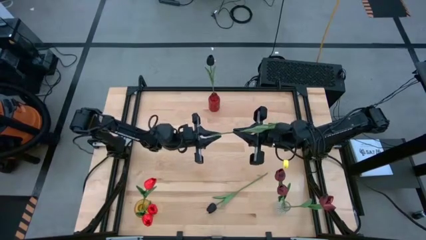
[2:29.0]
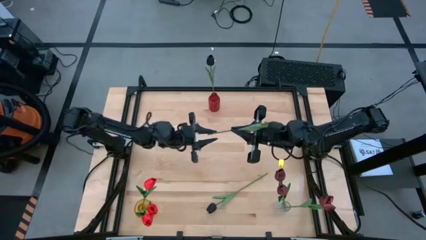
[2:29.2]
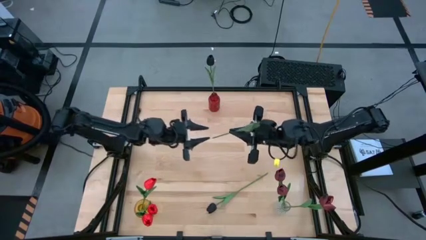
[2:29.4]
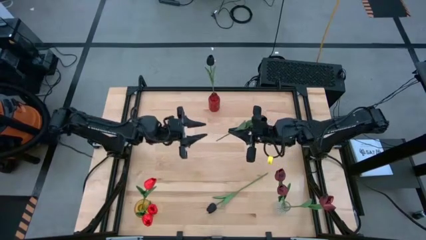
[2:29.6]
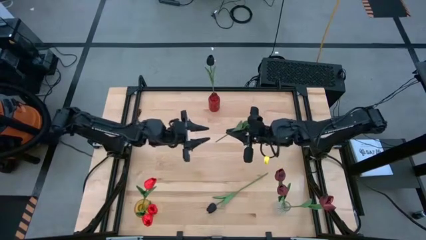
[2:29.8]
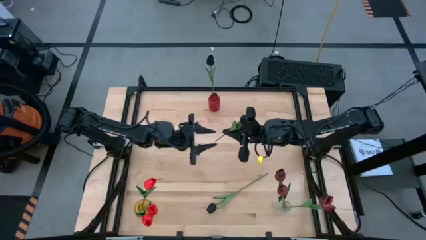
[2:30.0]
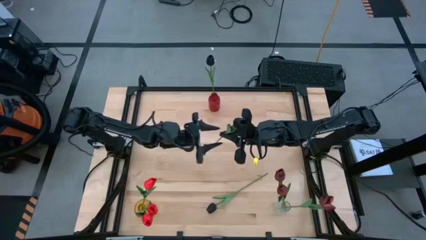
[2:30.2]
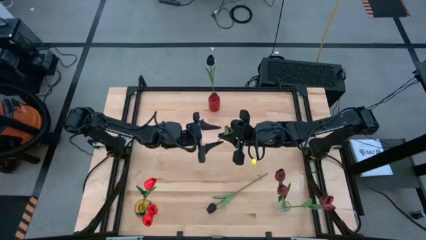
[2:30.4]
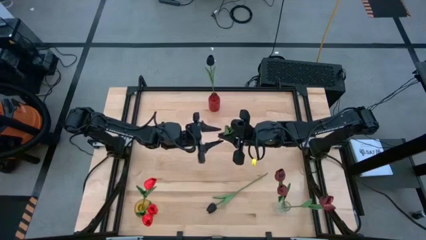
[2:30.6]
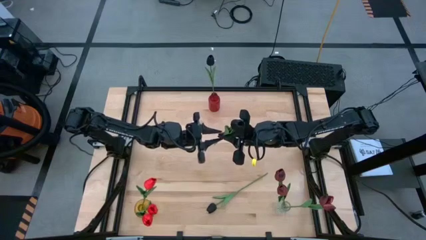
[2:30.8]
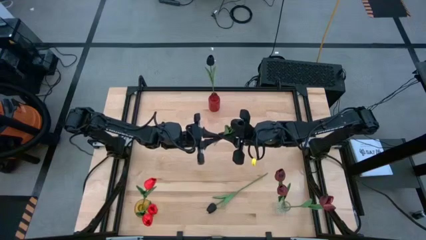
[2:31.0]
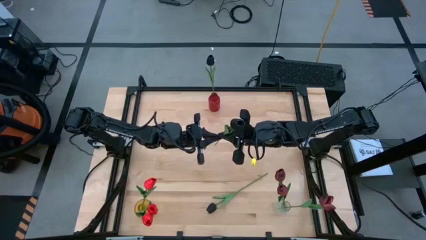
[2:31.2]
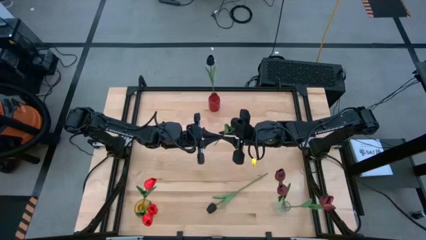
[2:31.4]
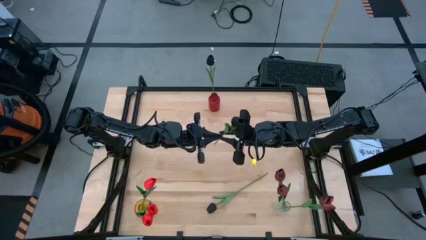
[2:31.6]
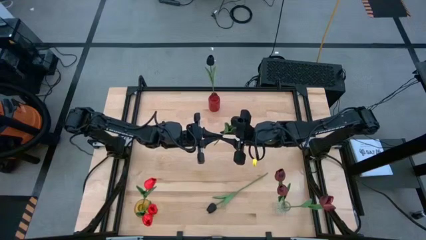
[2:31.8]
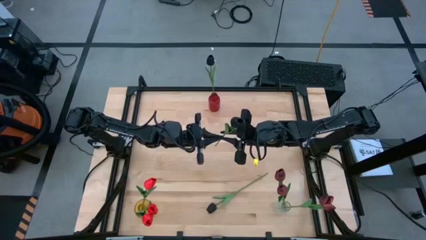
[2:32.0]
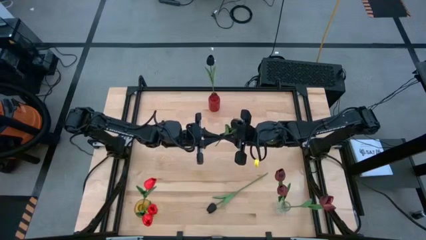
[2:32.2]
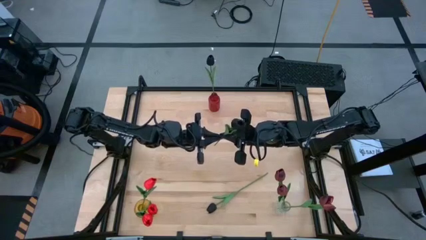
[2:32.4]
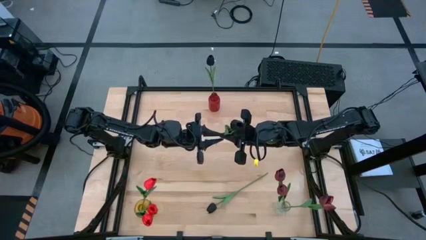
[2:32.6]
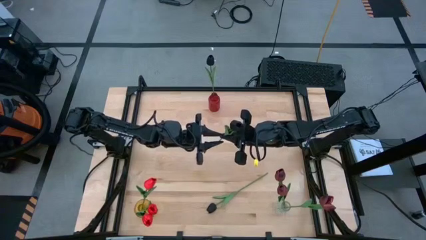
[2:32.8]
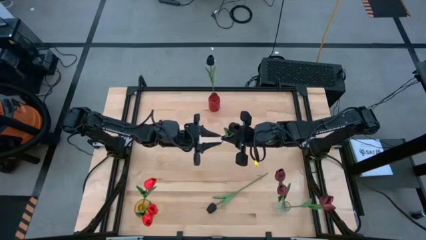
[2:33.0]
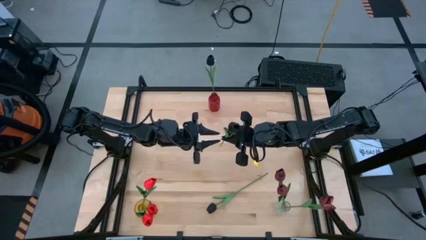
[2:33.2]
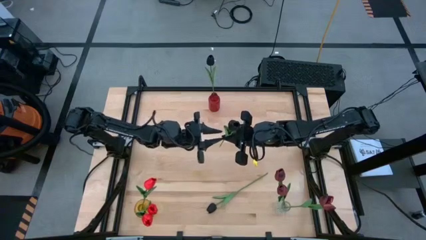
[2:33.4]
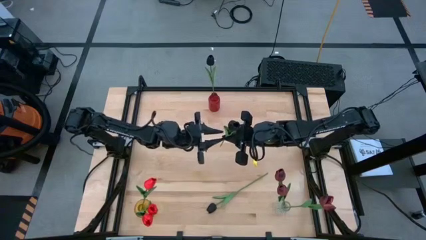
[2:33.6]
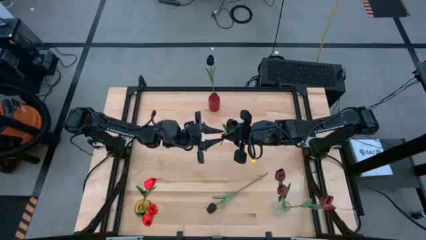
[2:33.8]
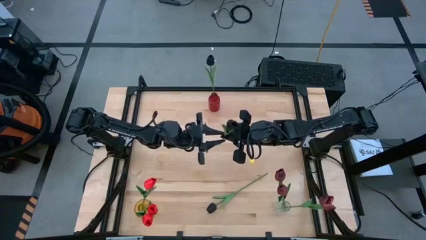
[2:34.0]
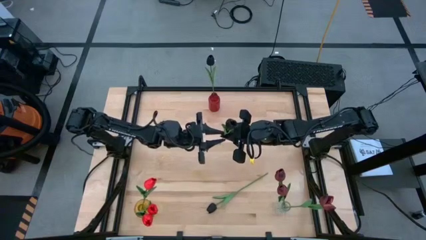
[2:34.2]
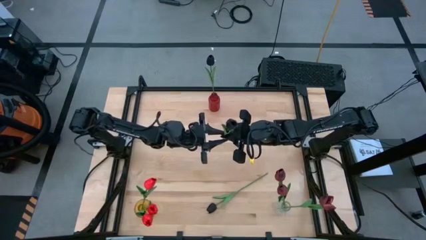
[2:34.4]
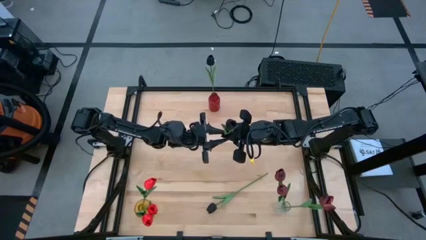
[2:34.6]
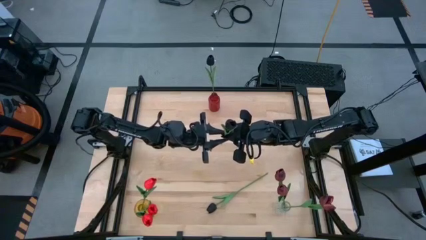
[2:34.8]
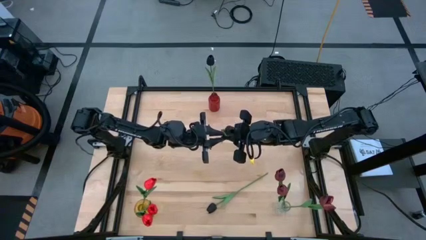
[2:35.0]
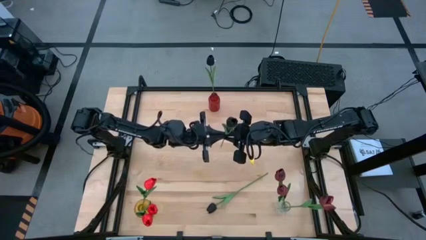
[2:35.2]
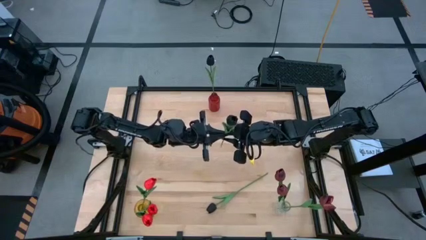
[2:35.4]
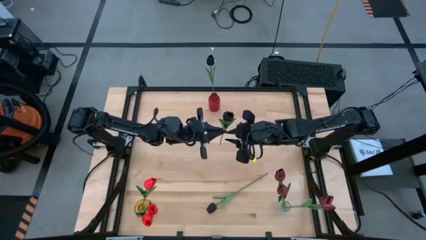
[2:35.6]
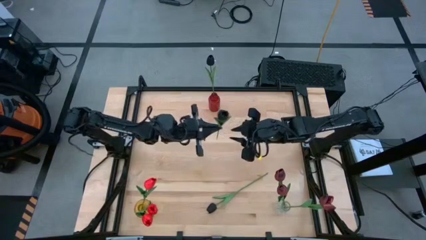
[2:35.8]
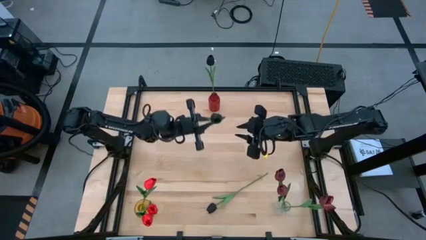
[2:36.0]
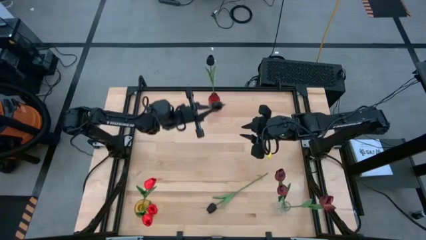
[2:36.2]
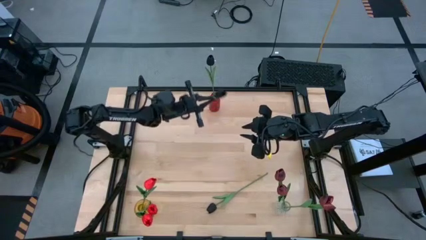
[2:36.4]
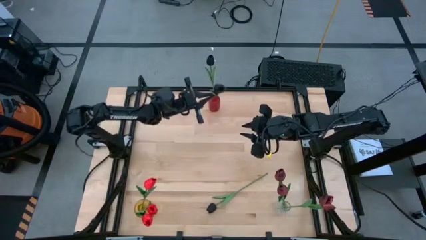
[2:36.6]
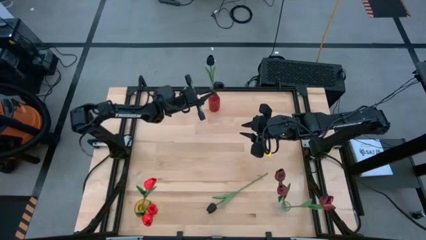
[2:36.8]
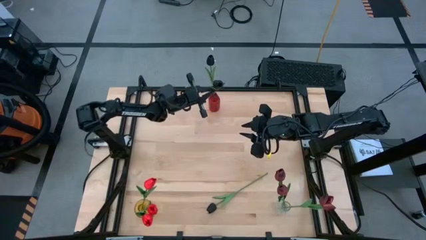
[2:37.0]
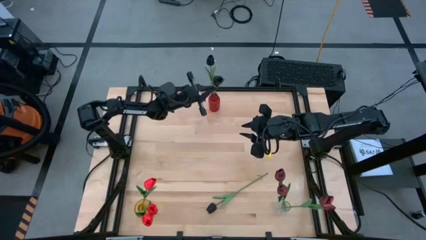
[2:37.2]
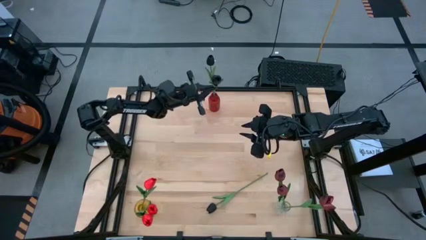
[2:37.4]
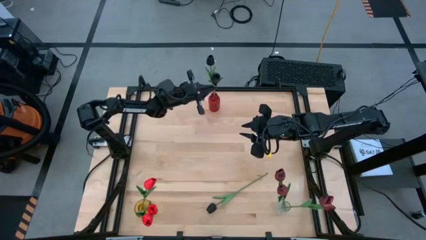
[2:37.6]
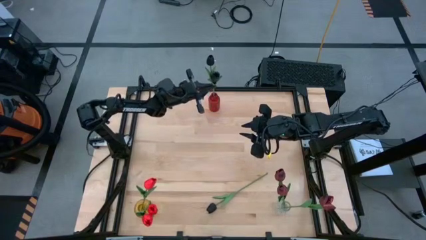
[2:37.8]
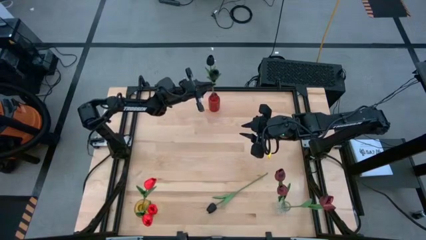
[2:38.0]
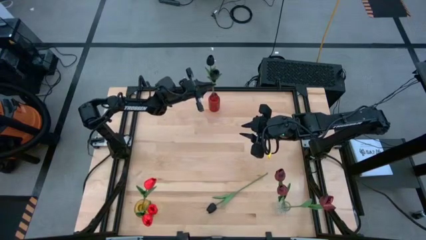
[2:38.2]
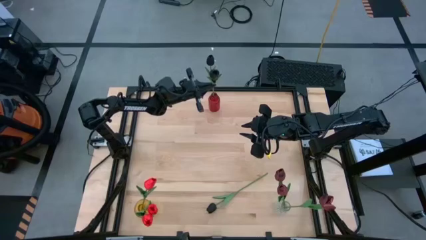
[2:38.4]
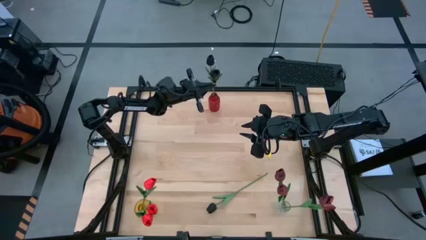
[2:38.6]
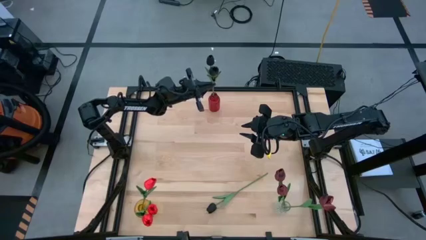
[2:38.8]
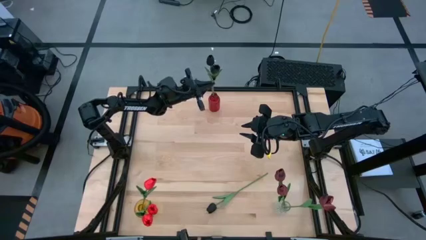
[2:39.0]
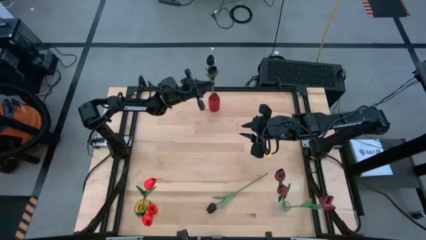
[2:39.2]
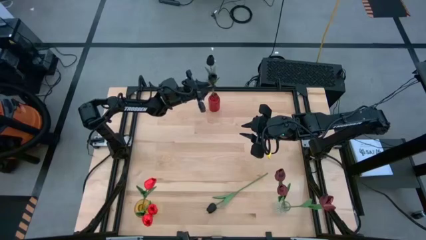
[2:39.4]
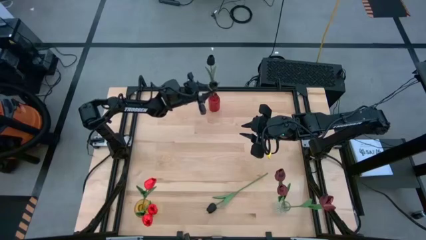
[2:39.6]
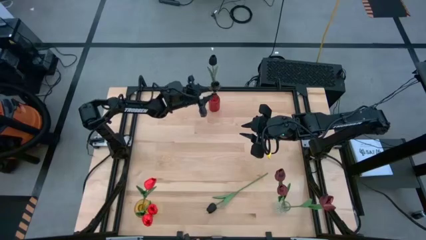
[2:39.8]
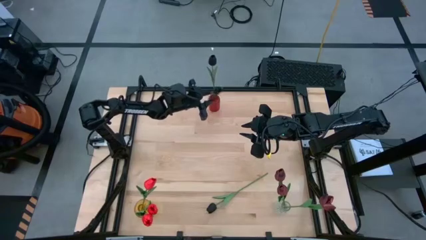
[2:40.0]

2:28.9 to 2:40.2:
Task: Sort flowers into vase by color
Put the top black flower into the red vase

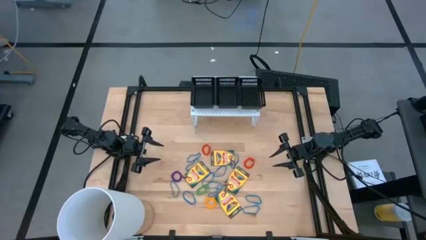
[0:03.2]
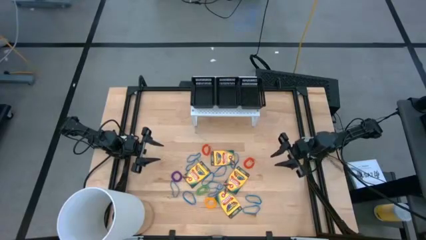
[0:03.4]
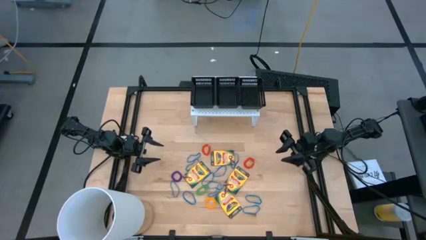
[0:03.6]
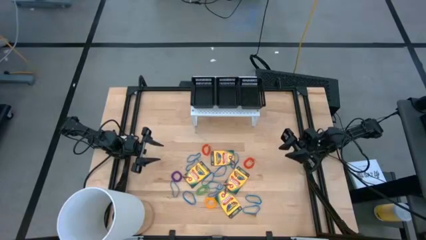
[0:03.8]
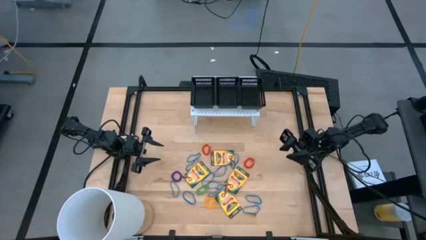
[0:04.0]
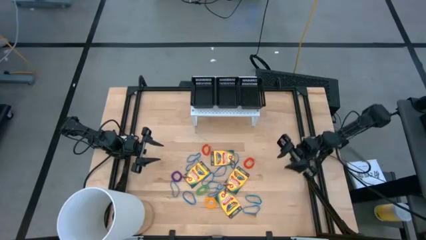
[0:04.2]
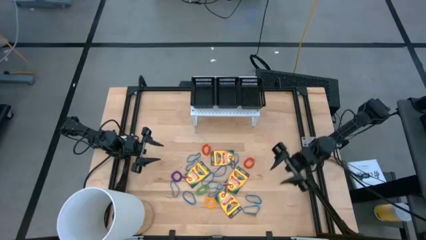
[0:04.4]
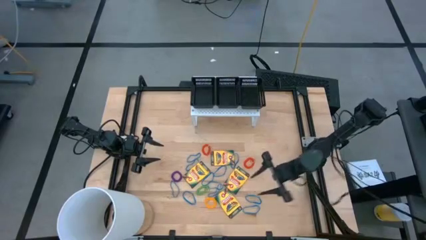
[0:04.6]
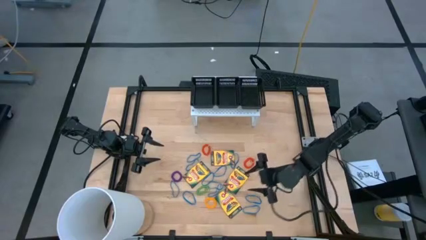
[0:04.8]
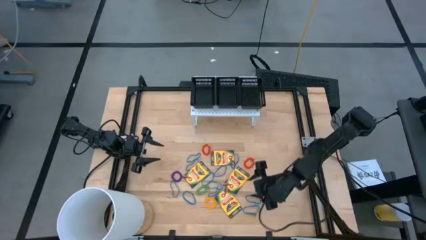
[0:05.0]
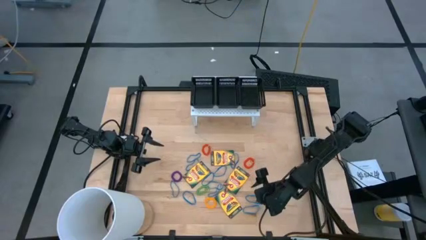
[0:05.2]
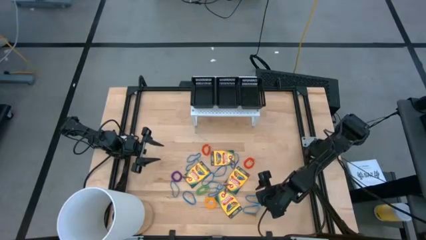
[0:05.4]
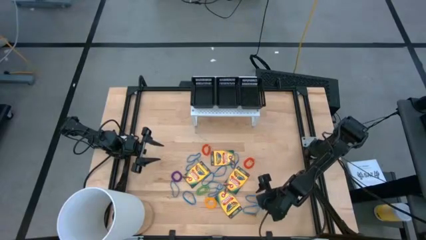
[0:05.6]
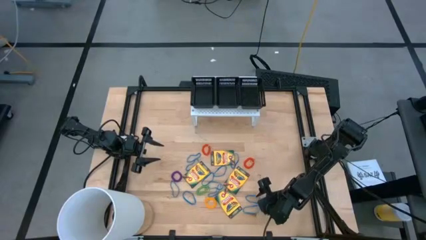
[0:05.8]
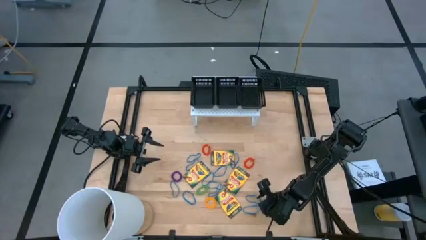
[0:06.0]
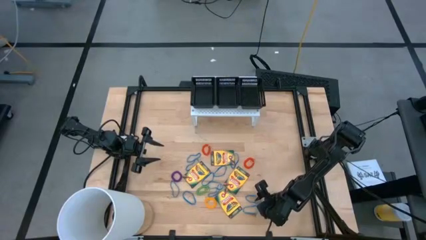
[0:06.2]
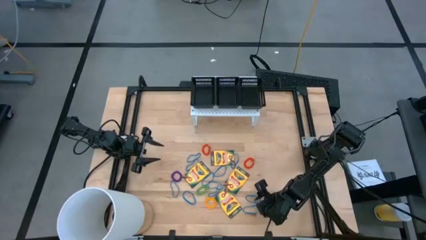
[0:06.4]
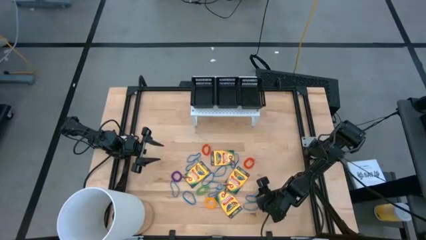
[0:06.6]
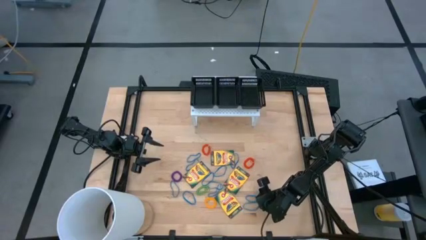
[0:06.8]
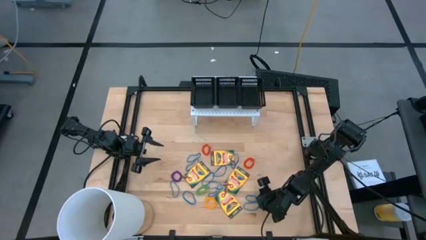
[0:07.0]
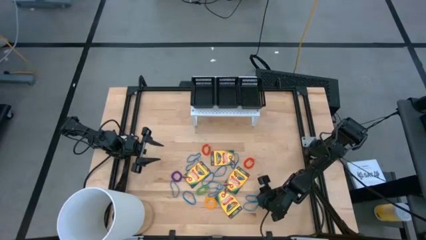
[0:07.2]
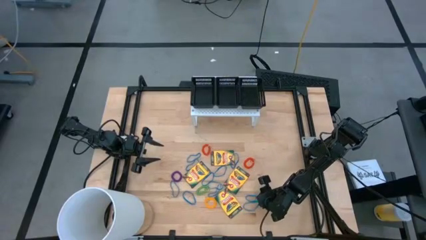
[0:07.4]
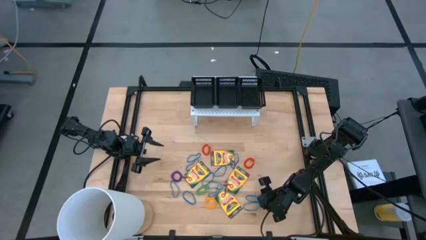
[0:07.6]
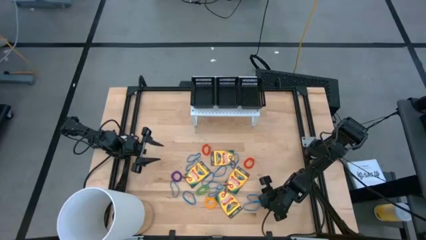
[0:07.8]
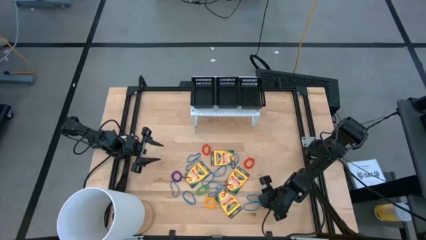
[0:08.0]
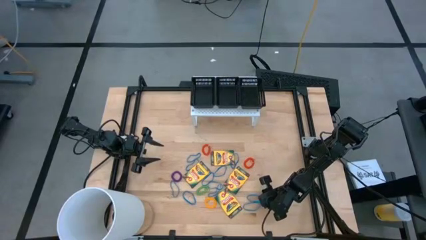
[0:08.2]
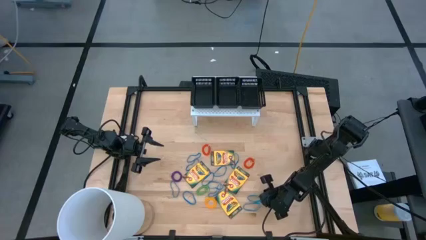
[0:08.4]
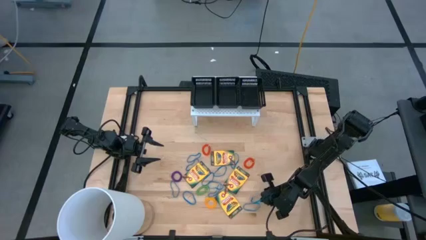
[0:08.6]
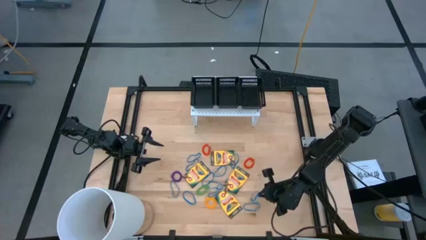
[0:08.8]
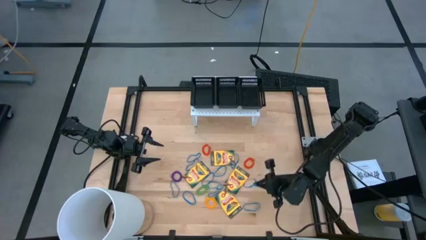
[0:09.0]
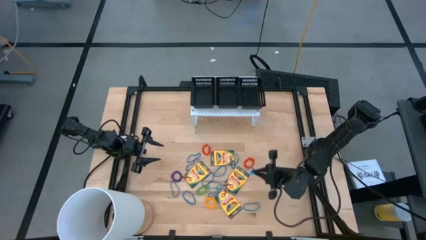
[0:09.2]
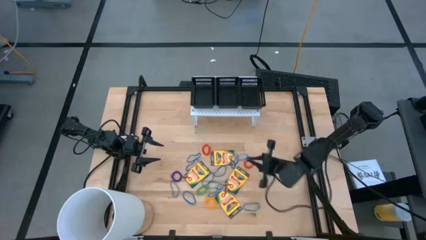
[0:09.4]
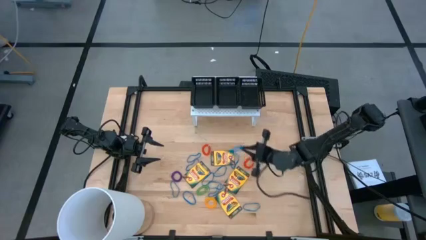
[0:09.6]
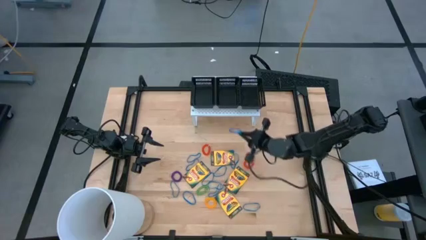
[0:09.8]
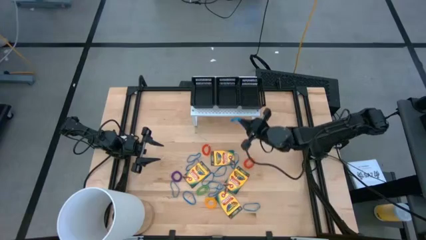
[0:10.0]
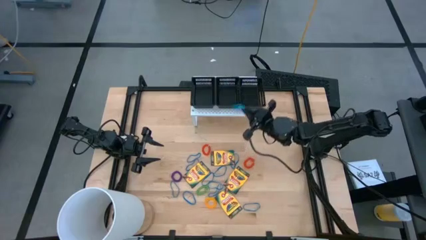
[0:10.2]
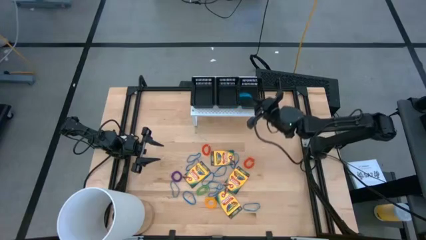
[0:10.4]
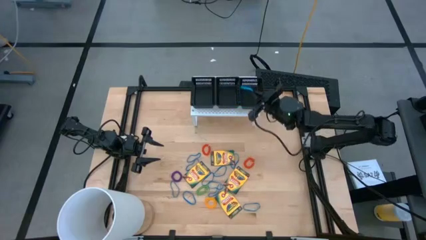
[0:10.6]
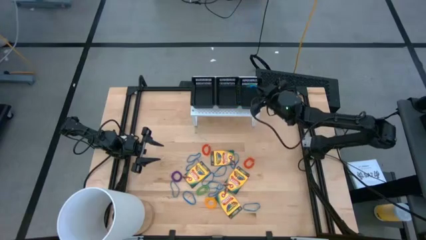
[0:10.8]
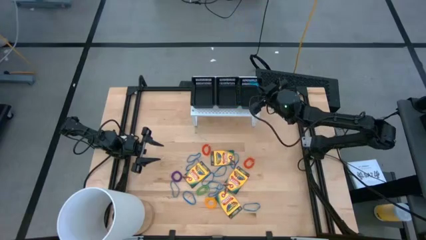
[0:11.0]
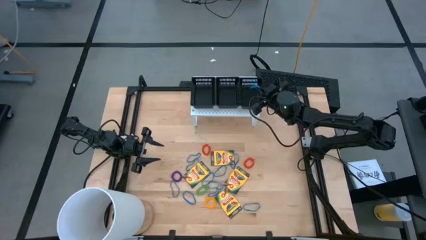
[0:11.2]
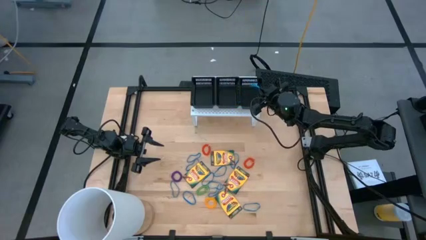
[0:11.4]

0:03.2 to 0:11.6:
Task: Pick & Place Office Desk Supplies
Put the blue rubber band into the right black bin on the shelf
